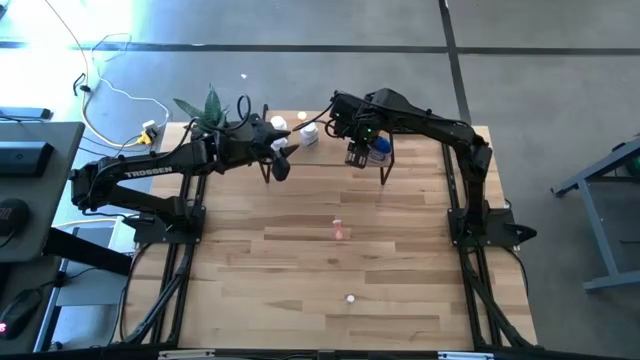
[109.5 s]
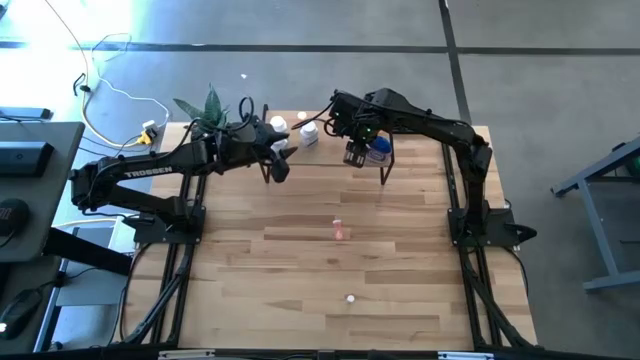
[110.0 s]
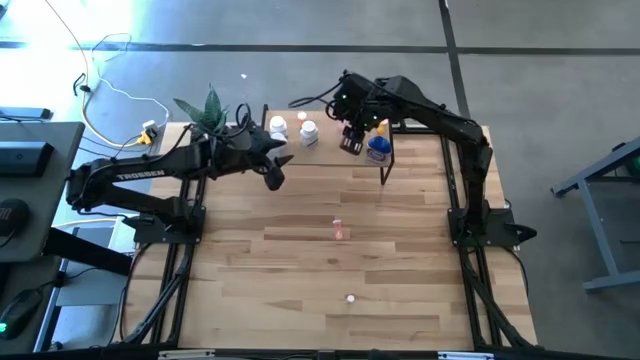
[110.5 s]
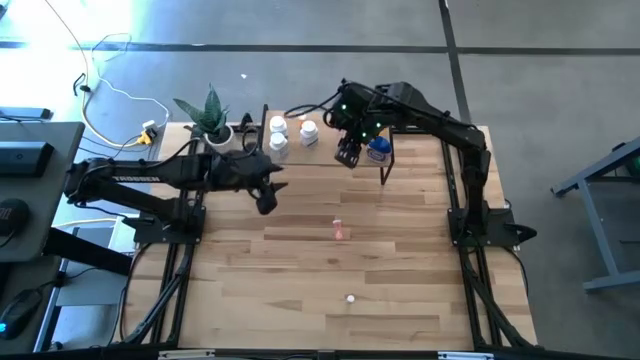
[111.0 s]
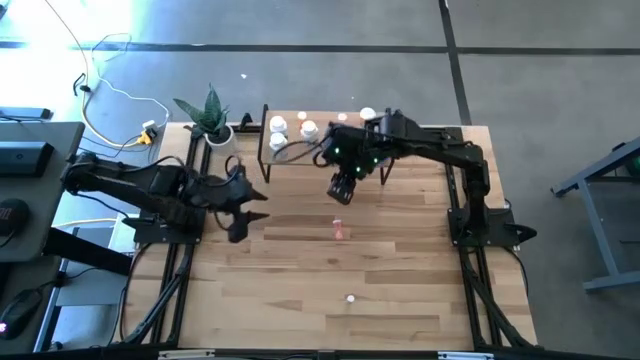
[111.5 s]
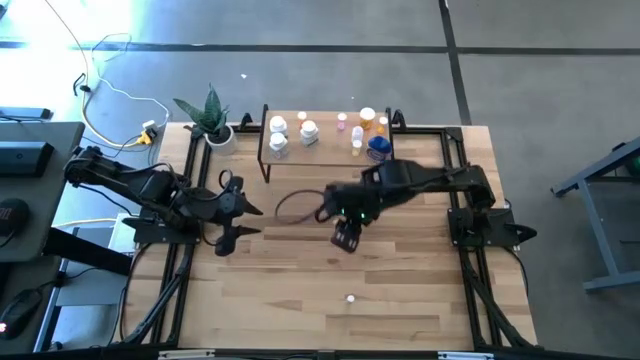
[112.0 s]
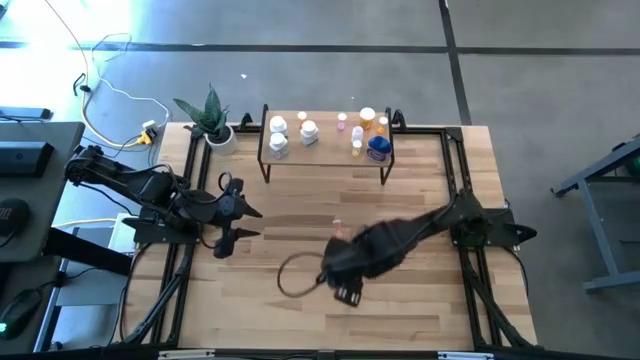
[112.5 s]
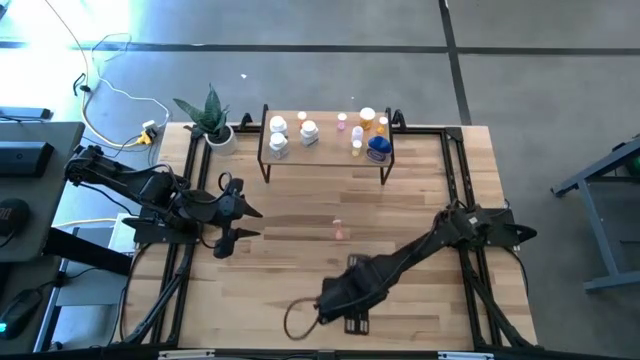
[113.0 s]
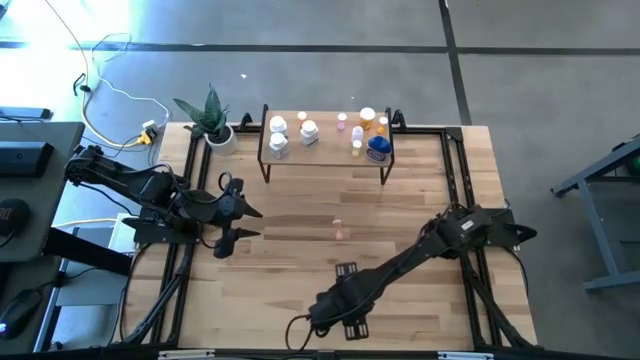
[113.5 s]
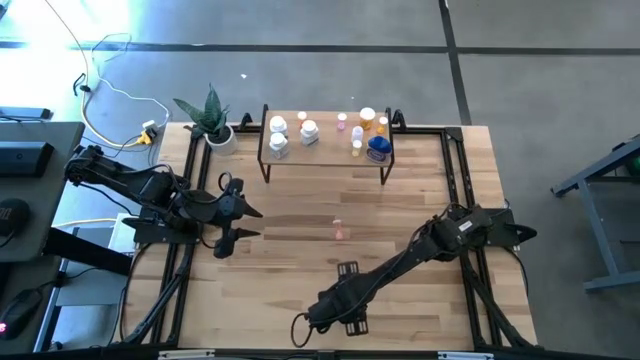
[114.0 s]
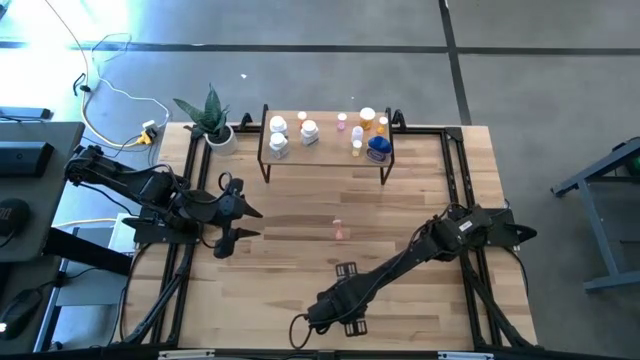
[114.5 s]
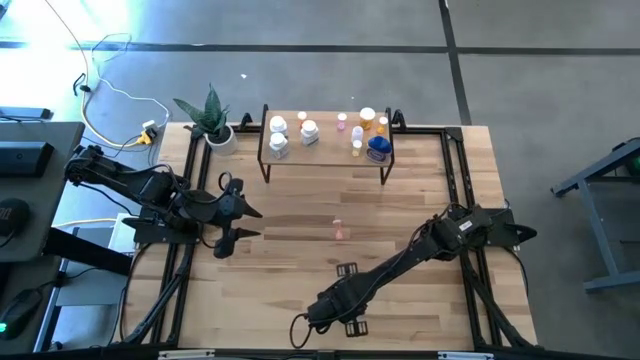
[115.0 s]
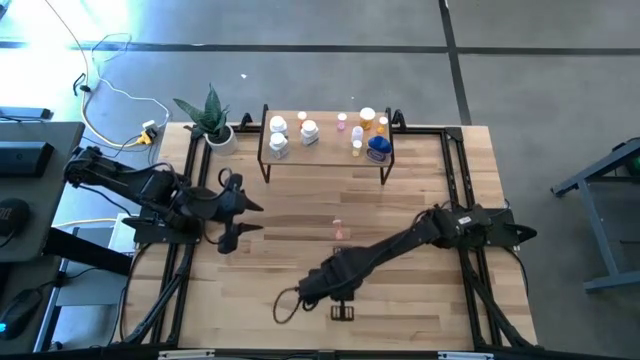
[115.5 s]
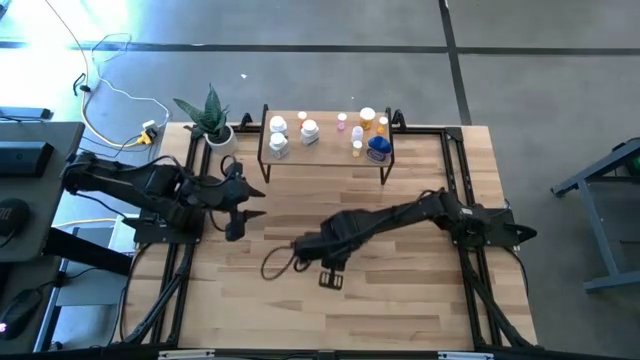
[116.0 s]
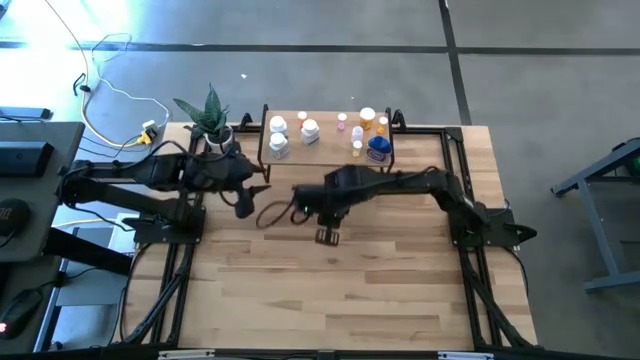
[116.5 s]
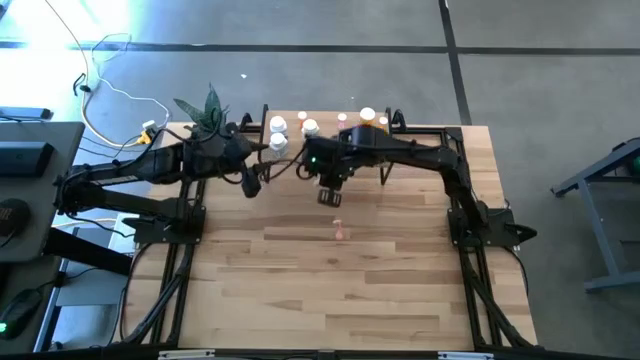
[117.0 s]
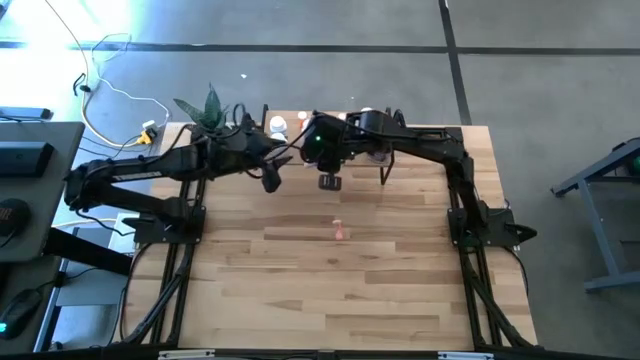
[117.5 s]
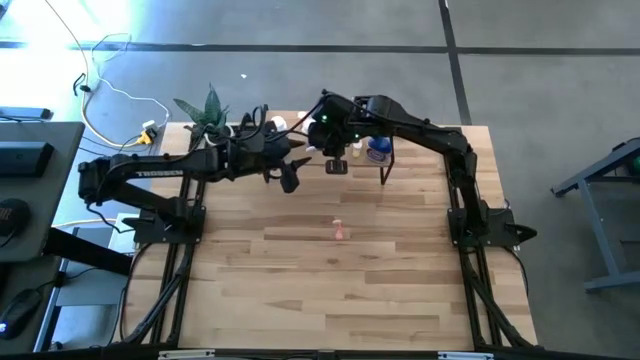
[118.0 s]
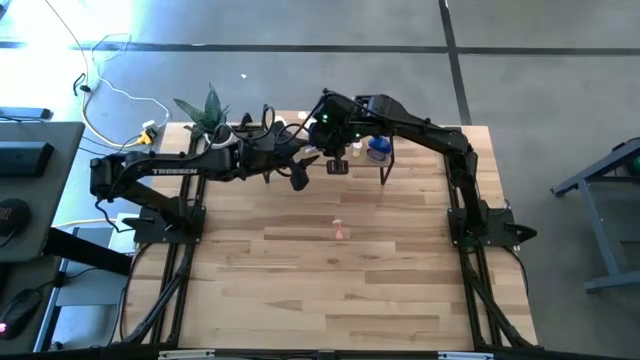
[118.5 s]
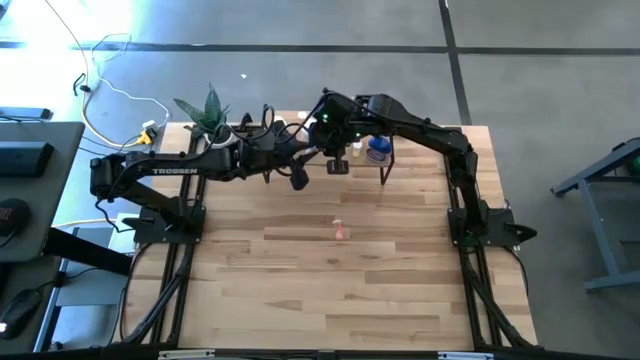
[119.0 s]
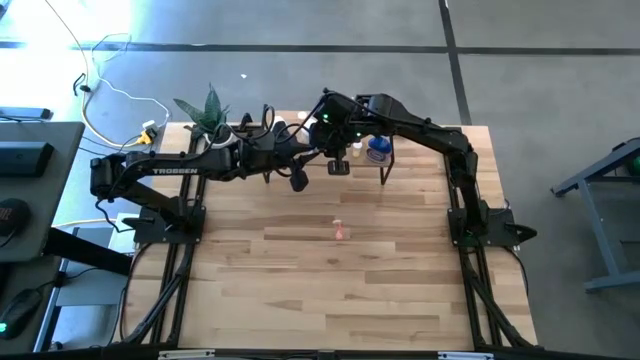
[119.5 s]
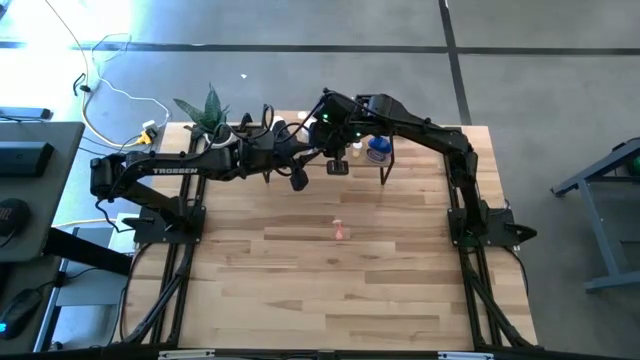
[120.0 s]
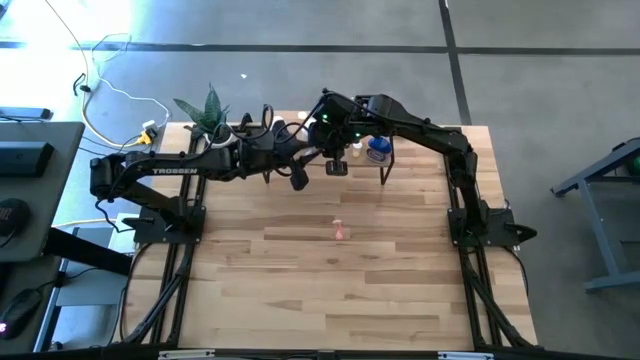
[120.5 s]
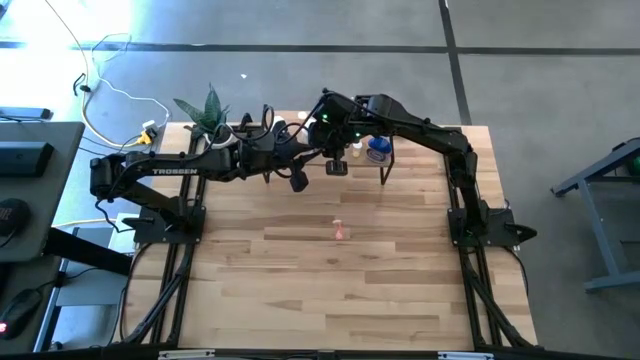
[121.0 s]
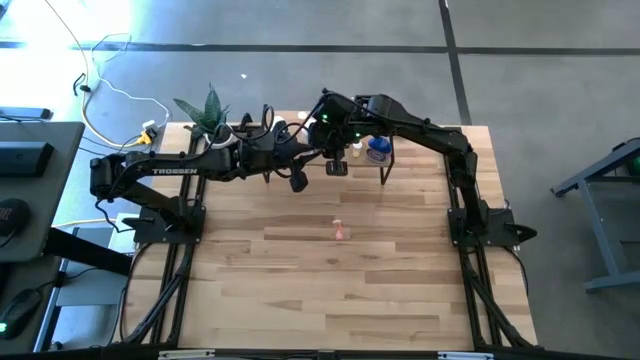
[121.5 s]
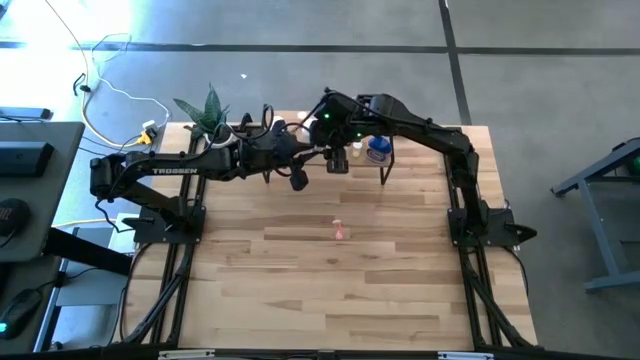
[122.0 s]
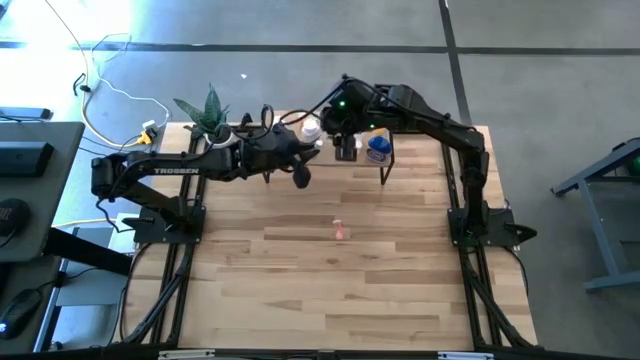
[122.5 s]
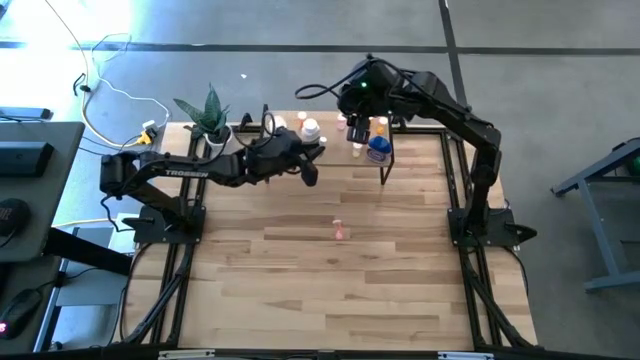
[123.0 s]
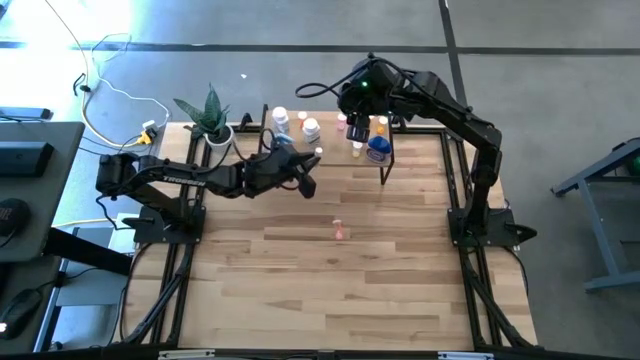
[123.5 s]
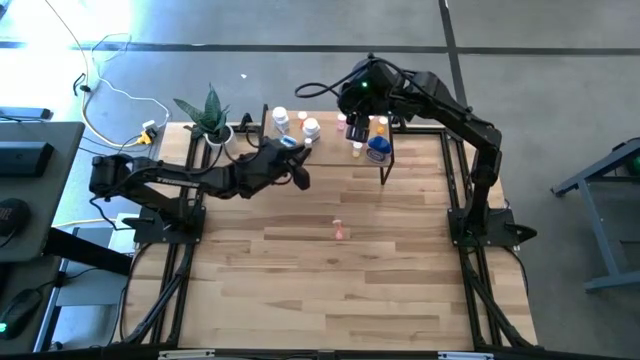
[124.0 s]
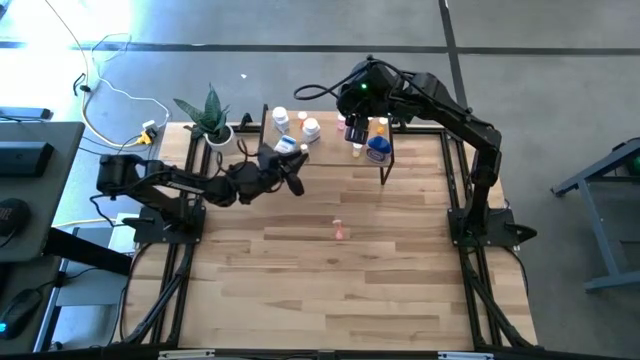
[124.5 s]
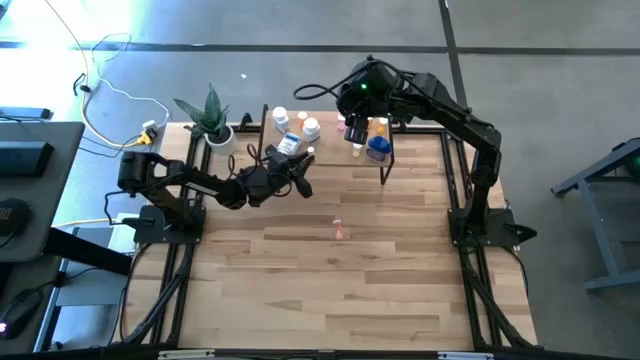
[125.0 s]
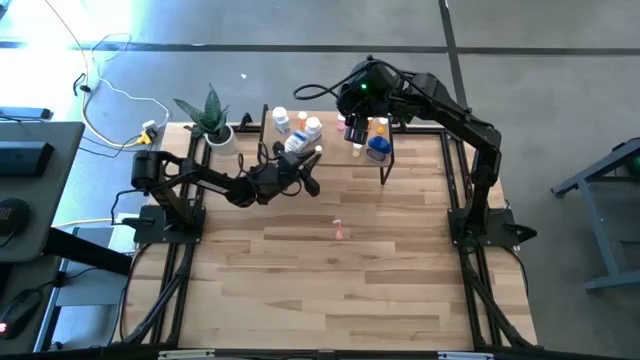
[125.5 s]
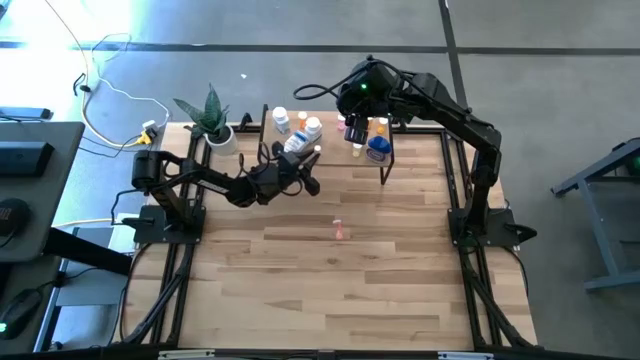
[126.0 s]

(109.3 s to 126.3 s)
Task: Pick and place medicine bottles onto shelf by color
Put the white pill bottle on the shelf

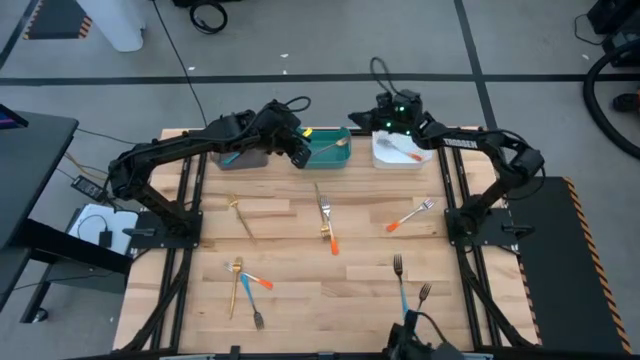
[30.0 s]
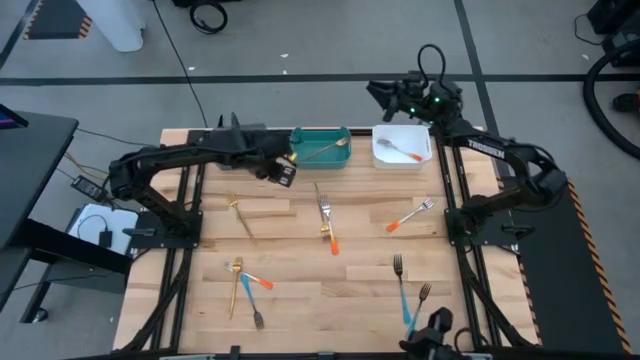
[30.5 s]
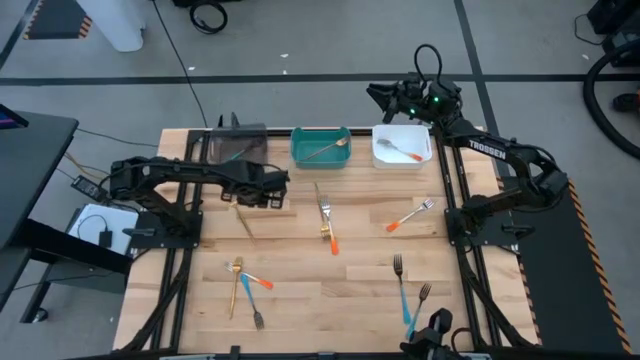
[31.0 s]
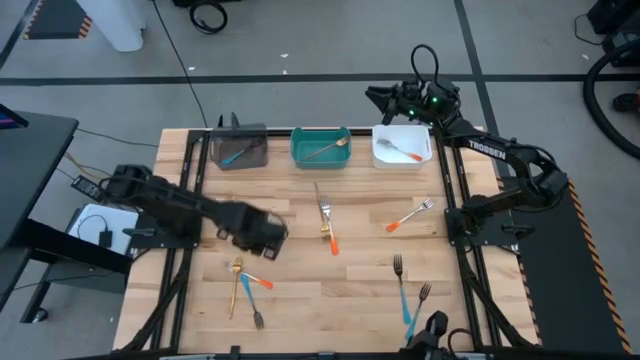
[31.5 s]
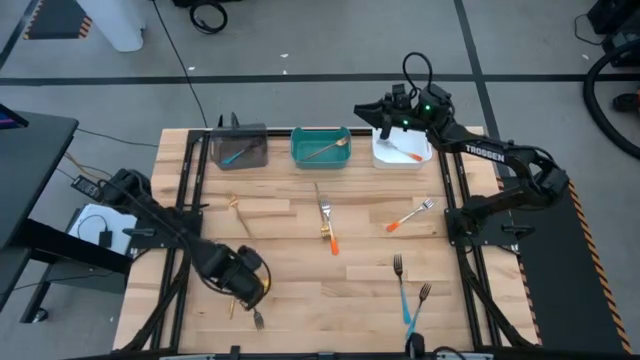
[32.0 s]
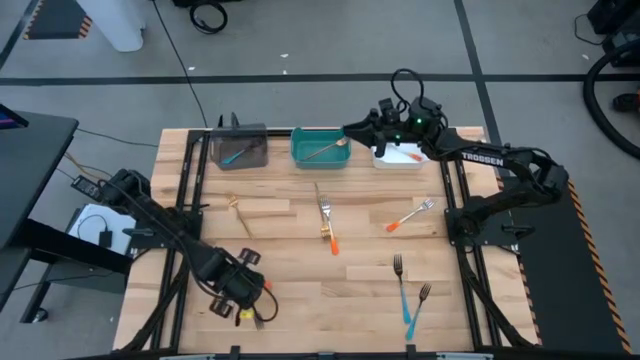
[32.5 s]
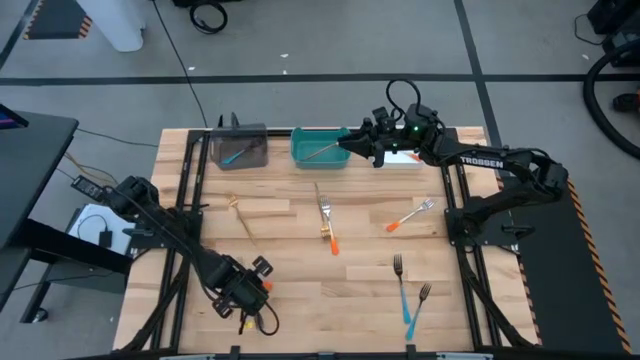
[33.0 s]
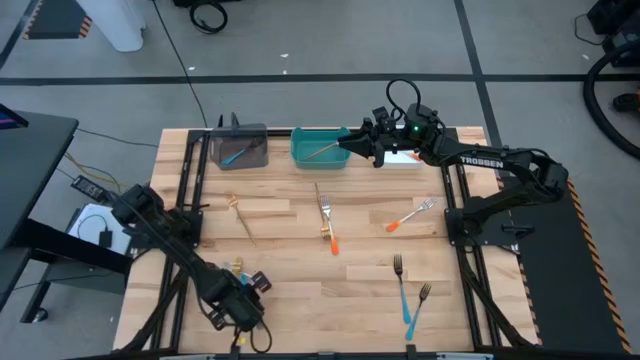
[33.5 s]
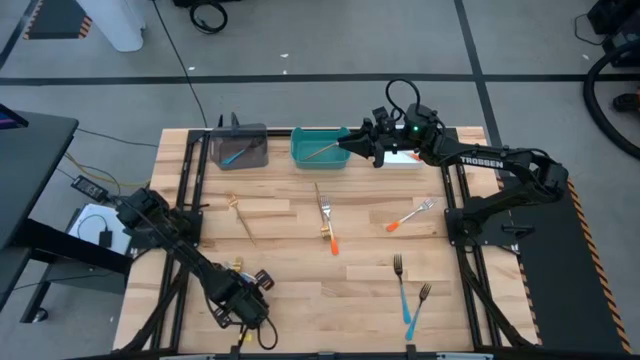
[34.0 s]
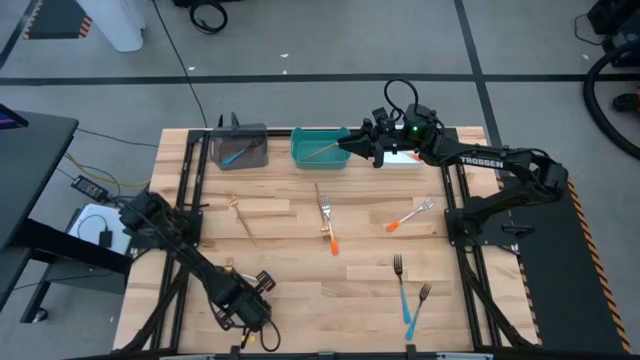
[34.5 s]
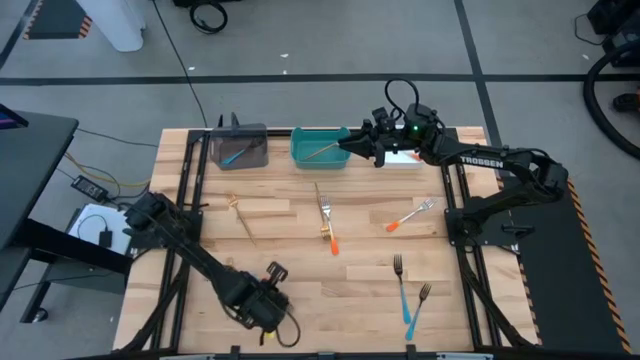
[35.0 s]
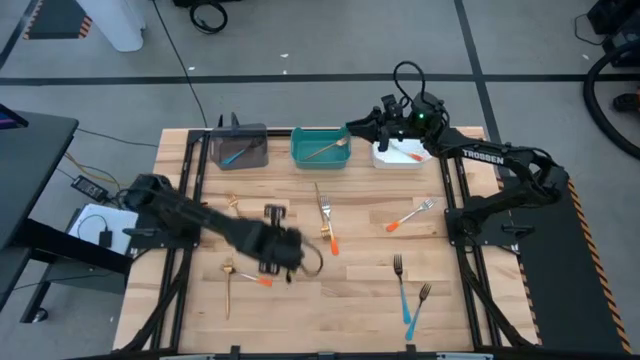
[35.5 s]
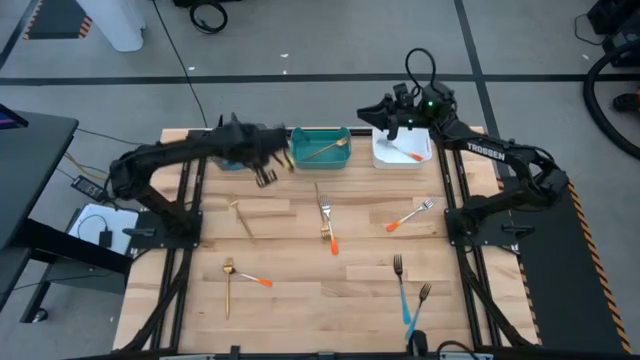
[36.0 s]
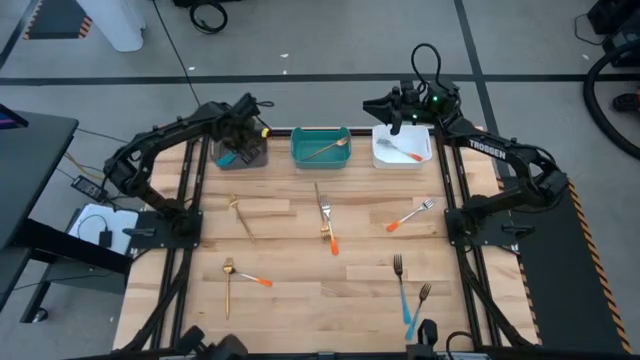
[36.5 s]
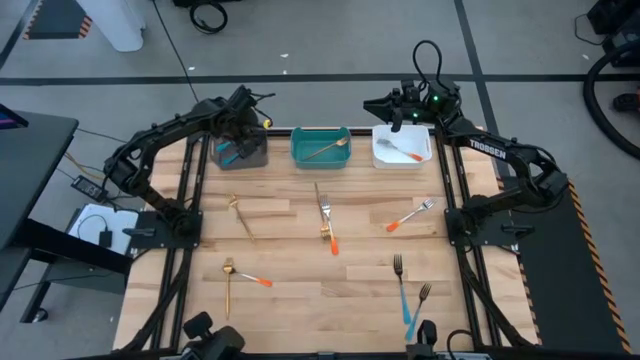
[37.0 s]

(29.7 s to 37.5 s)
Task: Sort silverware by color (type)
Put the blue fork into the black bin
